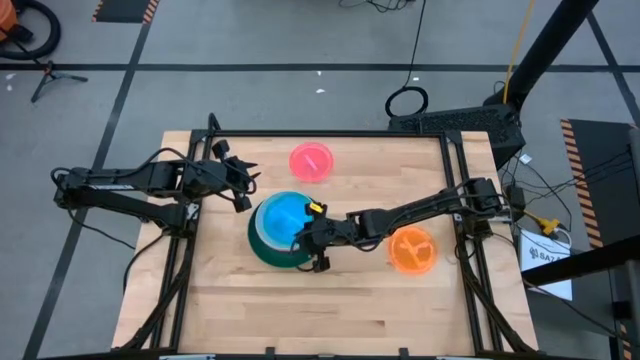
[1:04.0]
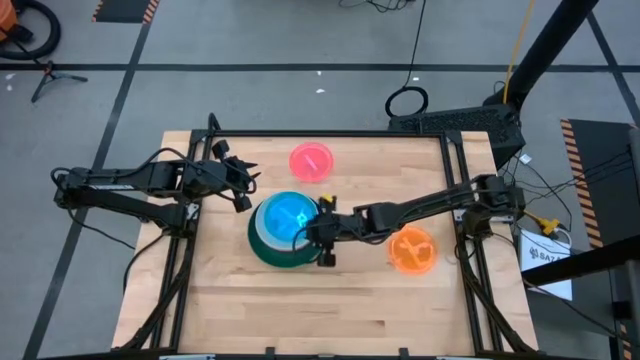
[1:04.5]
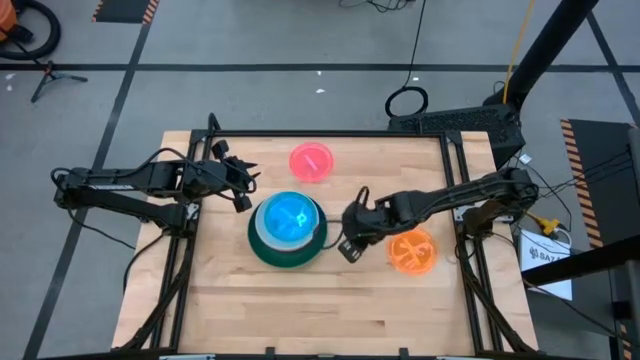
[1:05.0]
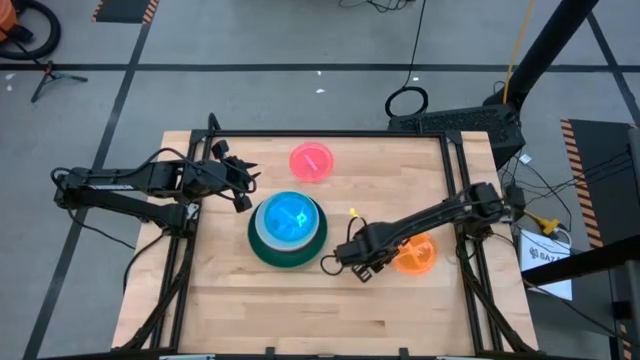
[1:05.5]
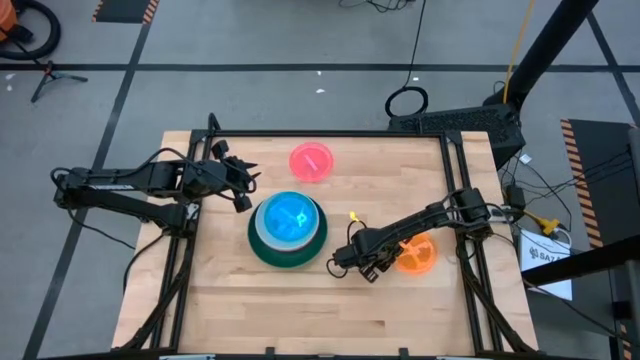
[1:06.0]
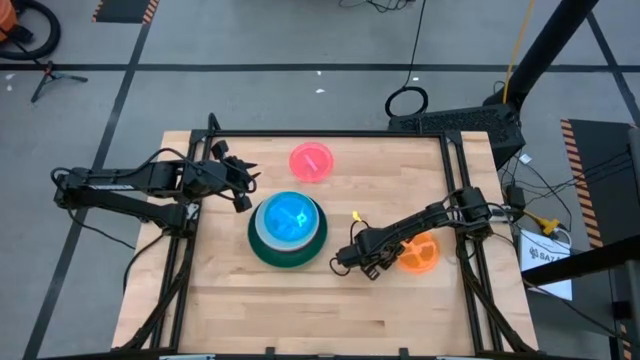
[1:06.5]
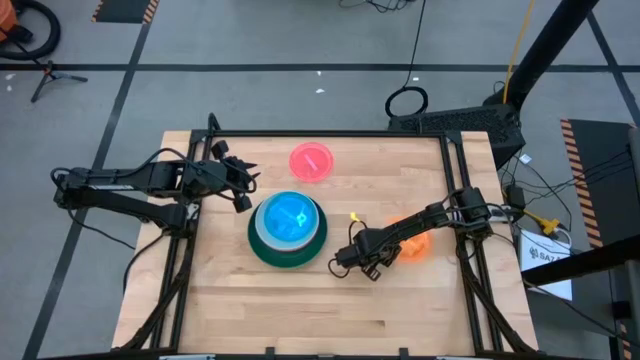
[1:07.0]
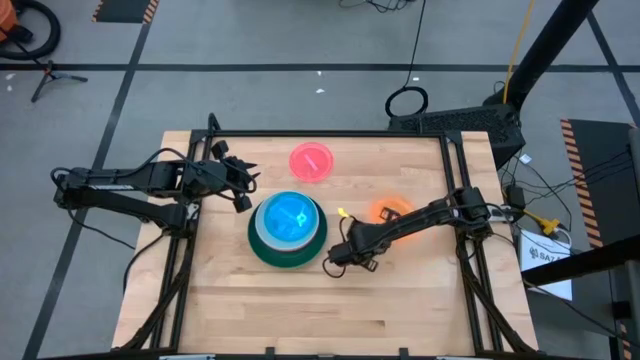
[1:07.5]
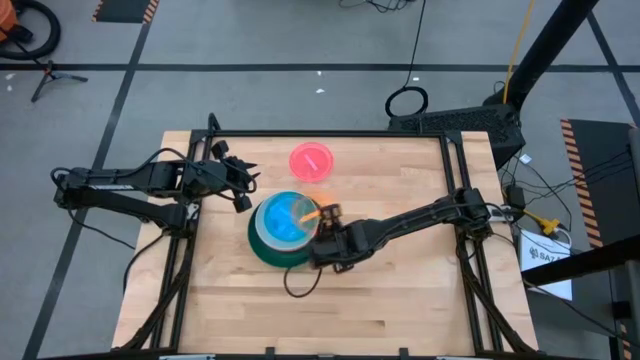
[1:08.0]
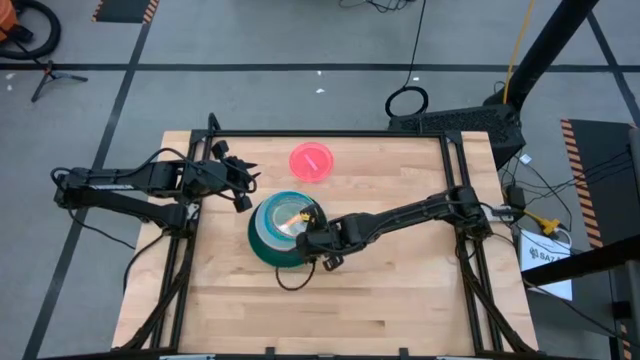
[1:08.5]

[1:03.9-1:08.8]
Task: Stack plastic plates
Stack the light orange plate on top of the light blue plate

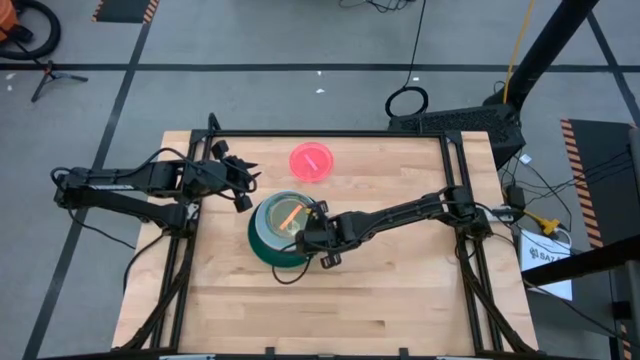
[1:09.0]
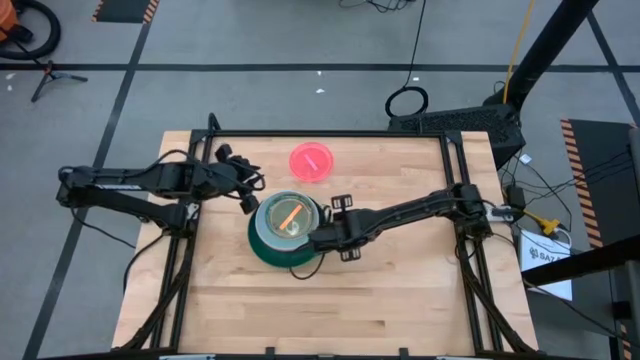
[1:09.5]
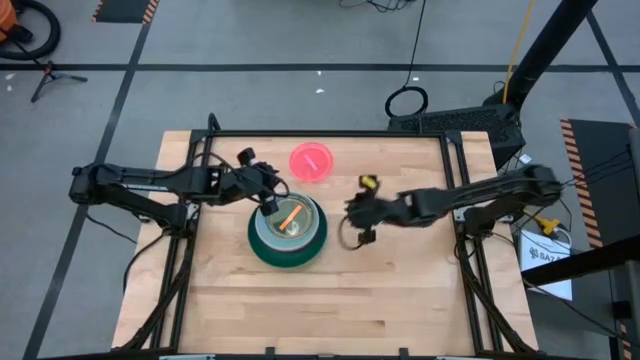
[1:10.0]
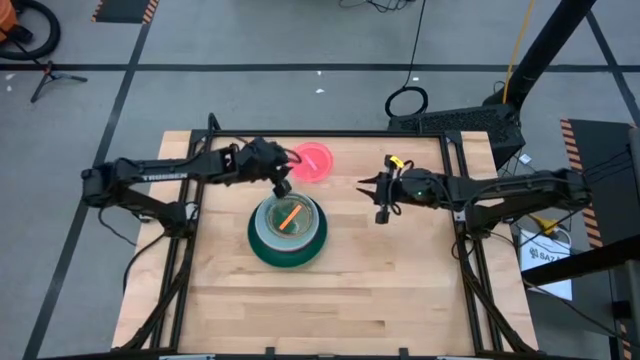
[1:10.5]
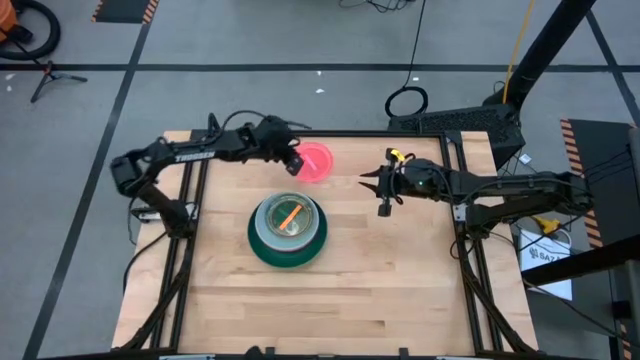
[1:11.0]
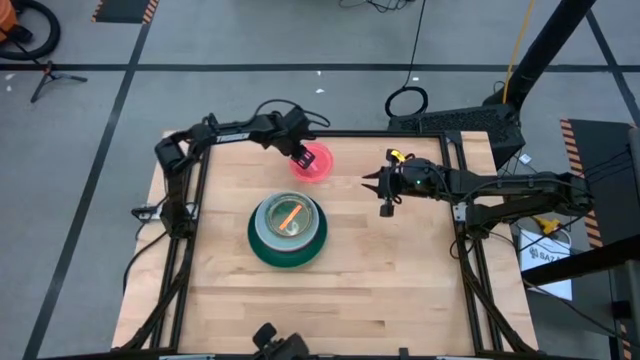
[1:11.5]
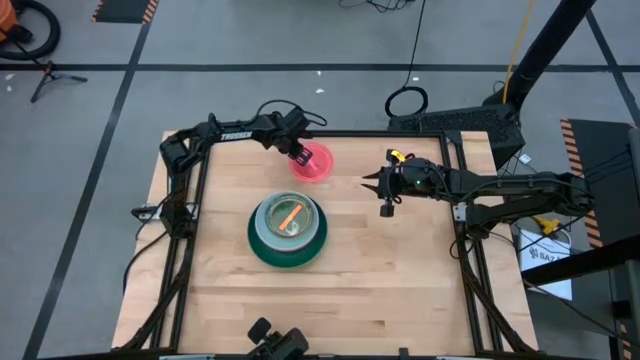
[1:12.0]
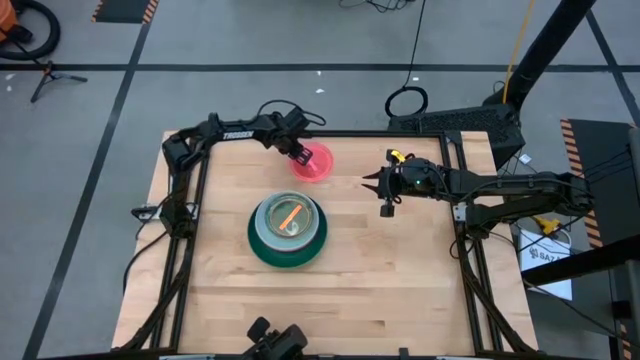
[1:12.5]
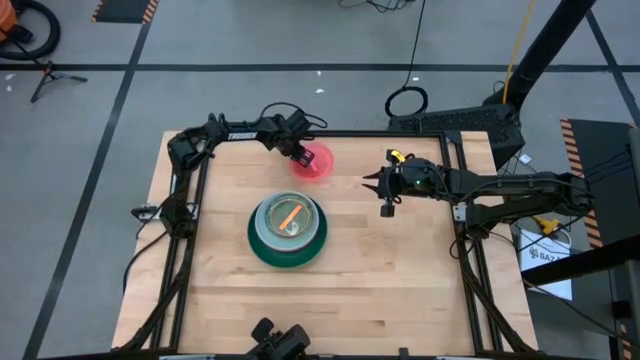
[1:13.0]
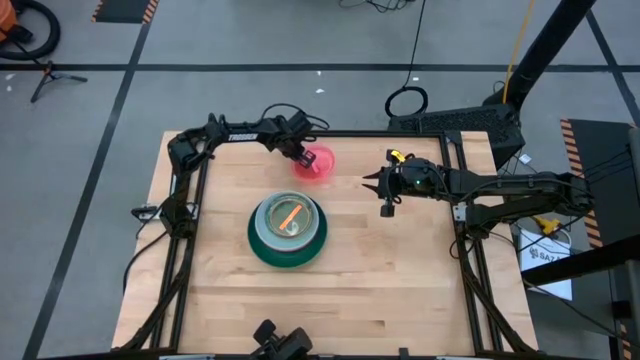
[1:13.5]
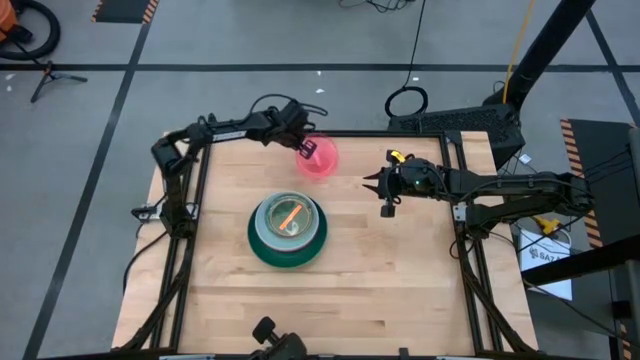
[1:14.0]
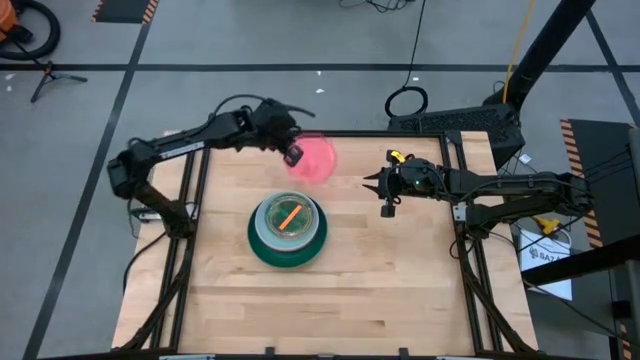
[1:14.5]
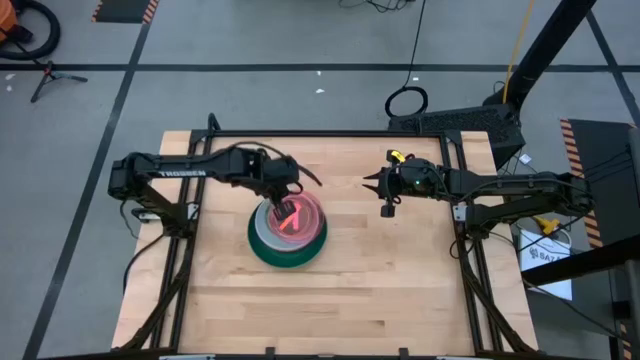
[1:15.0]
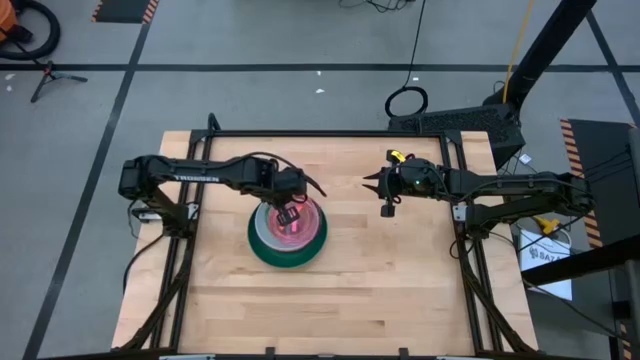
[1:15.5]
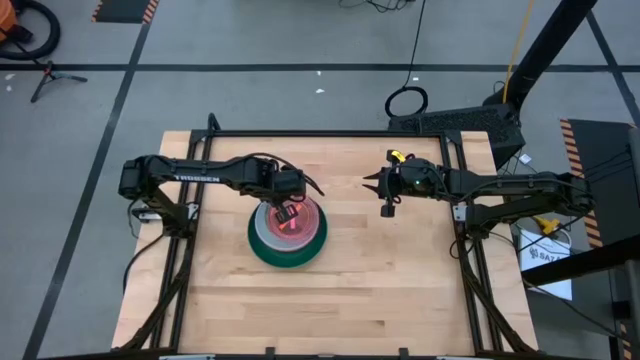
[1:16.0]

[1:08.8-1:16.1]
Stack the light pink plate on top of the light orange plate

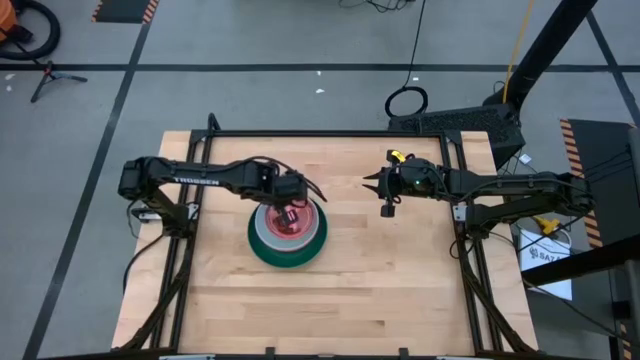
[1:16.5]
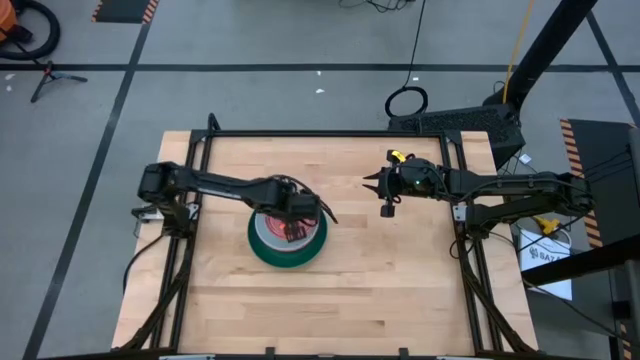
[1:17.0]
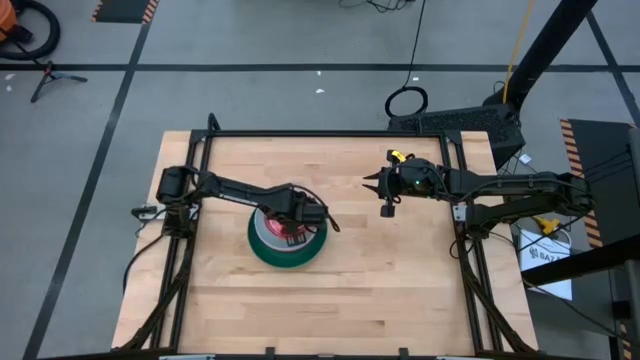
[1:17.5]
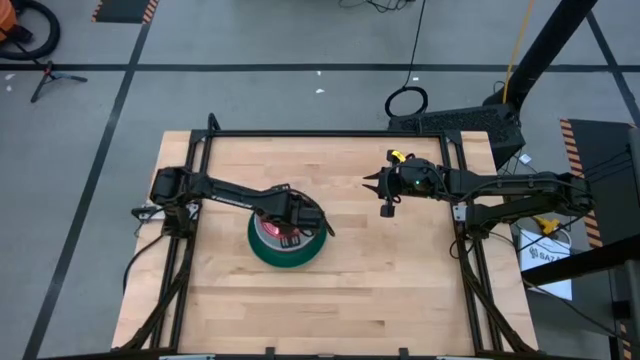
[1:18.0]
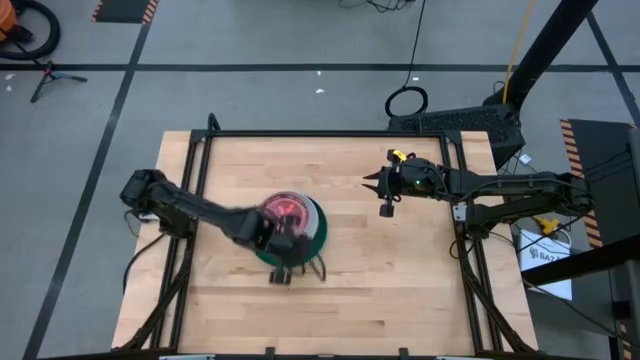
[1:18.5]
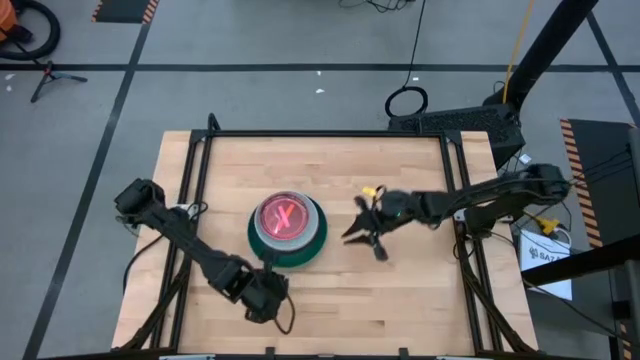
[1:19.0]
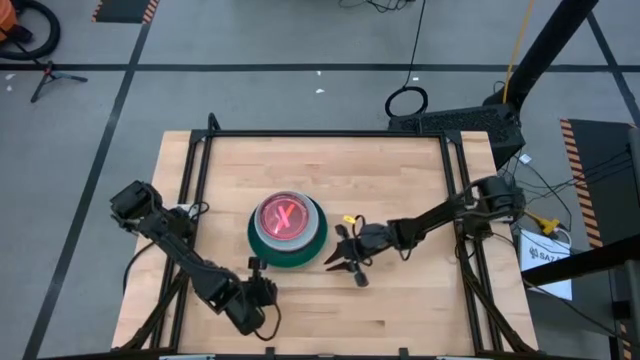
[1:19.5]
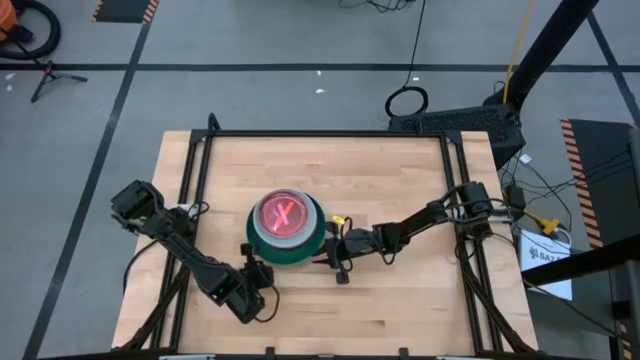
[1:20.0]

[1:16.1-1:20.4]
Adjust the stacked plates

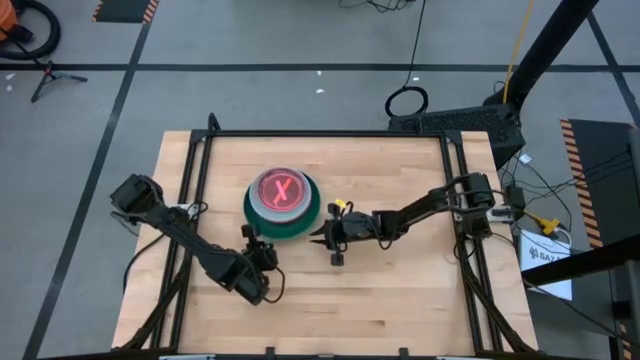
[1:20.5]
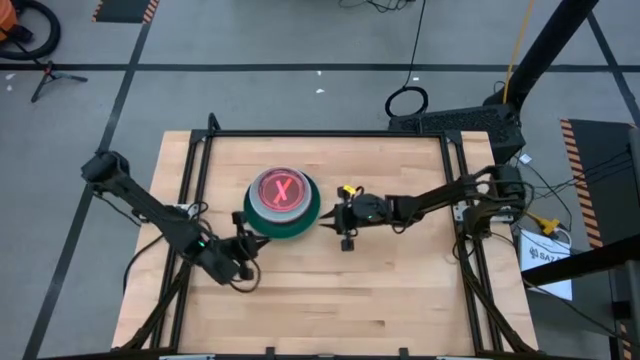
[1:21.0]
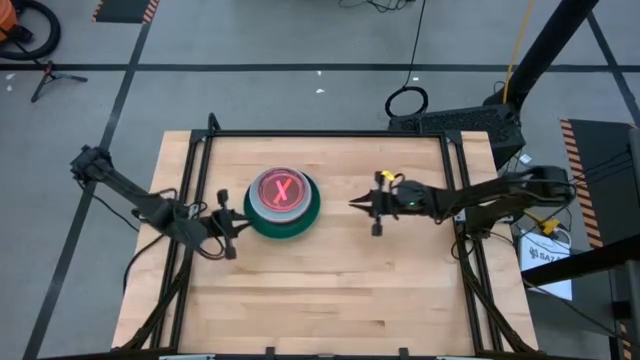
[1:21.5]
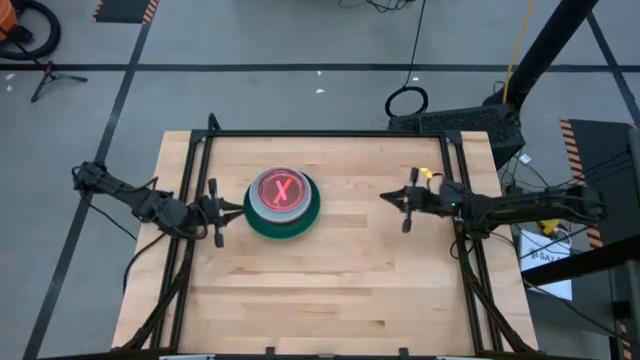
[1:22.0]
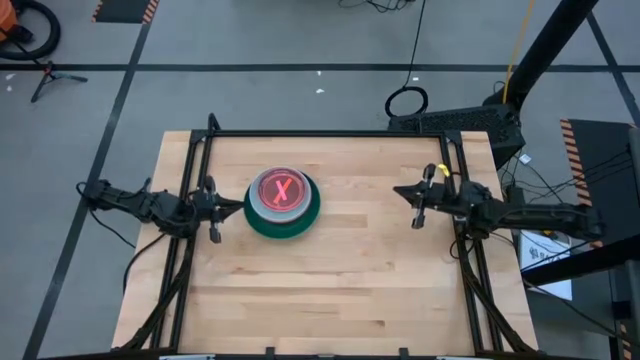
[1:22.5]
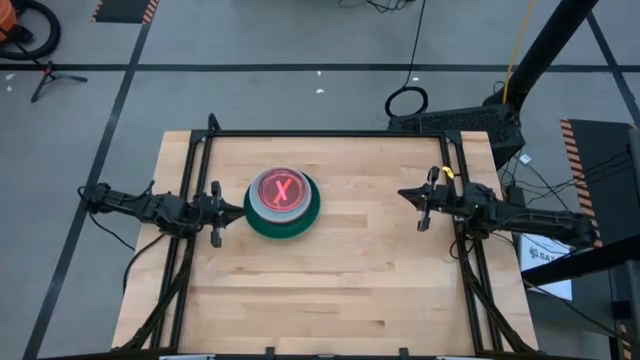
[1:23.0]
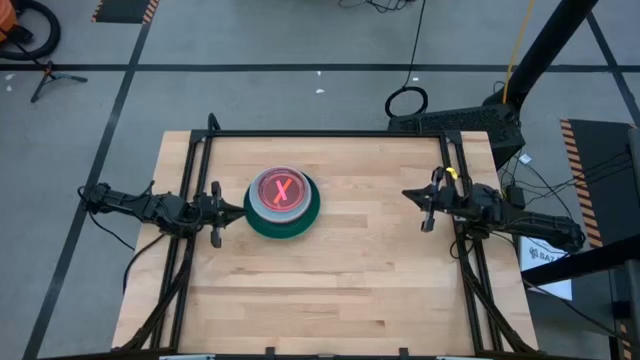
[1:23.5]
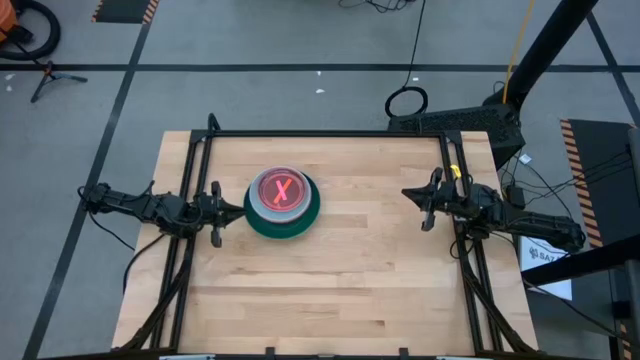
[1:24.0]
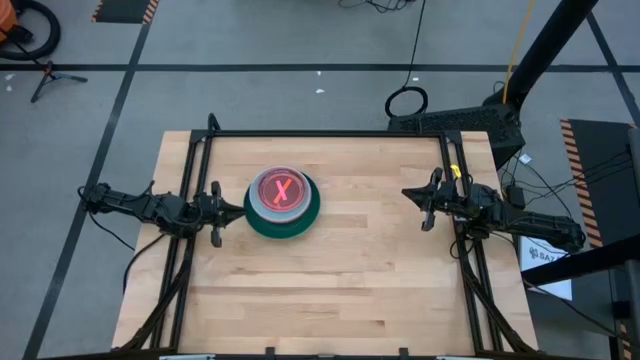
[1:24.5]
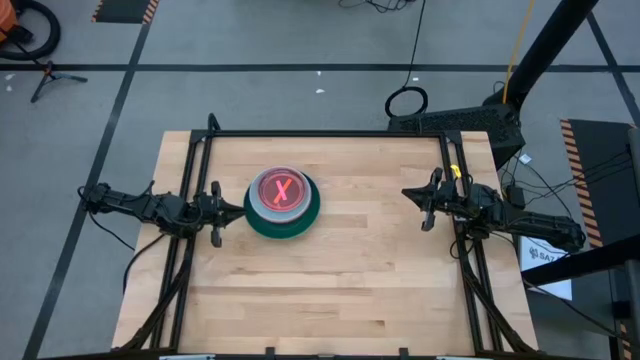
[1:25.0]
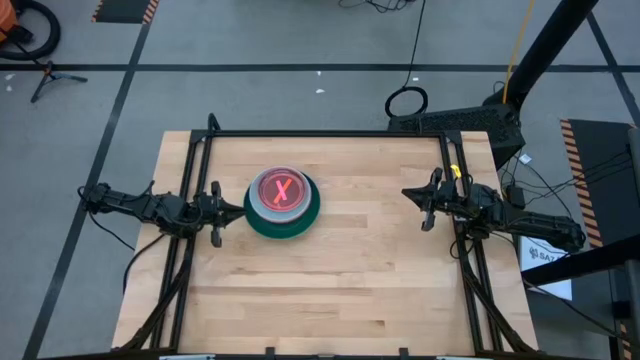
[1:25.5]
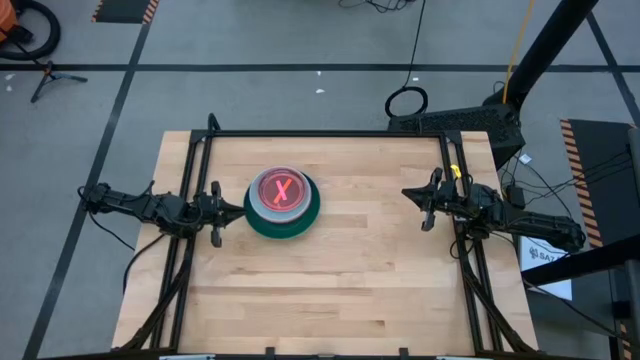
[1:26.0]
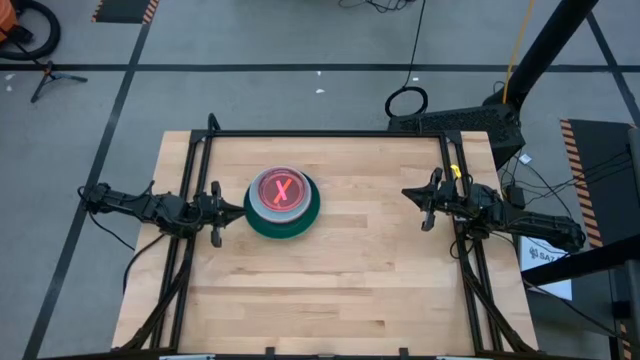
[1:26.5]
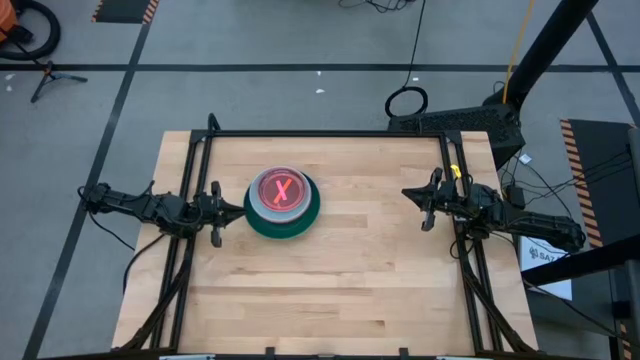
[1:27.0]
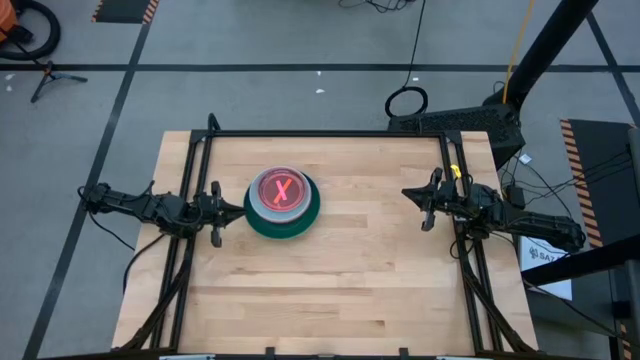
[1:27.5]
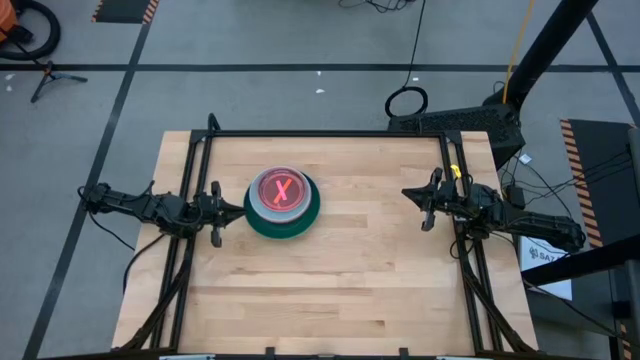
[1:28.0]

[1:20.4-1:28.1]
Return to Home Position
